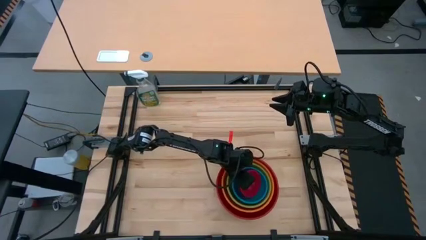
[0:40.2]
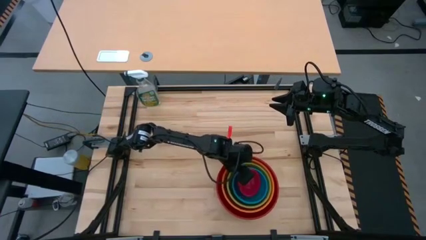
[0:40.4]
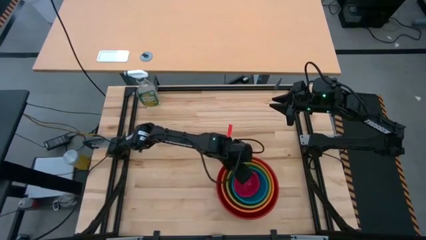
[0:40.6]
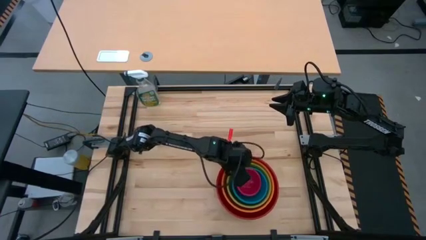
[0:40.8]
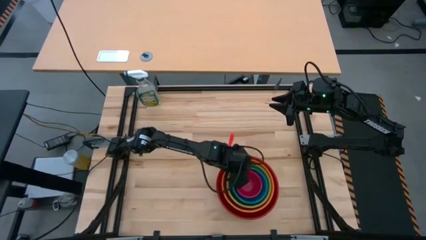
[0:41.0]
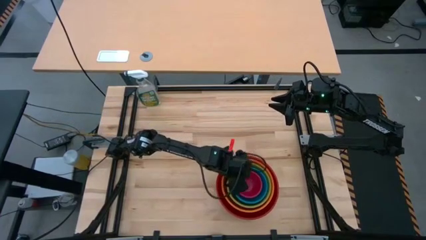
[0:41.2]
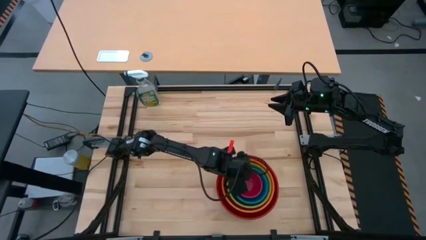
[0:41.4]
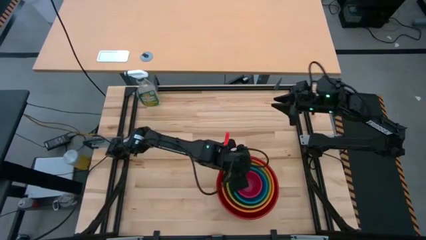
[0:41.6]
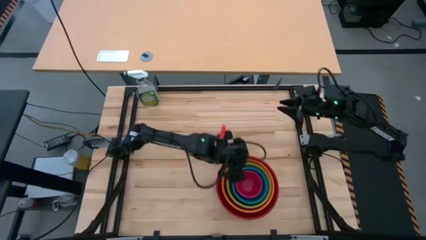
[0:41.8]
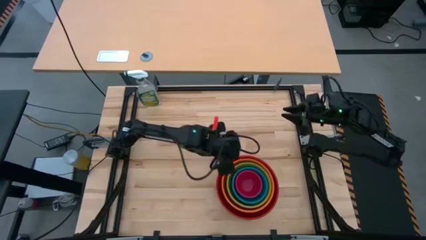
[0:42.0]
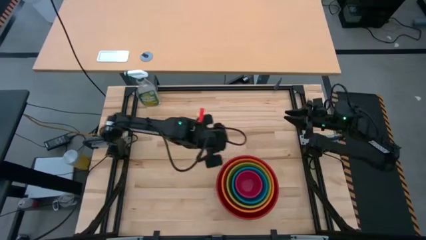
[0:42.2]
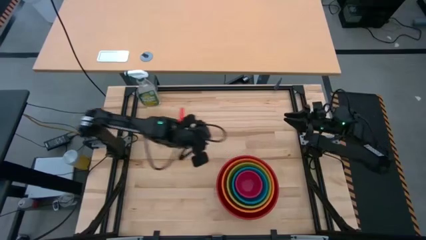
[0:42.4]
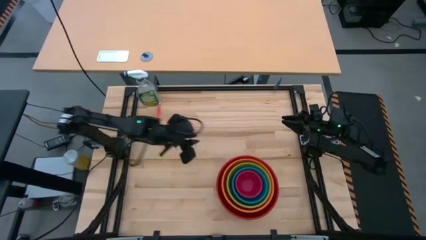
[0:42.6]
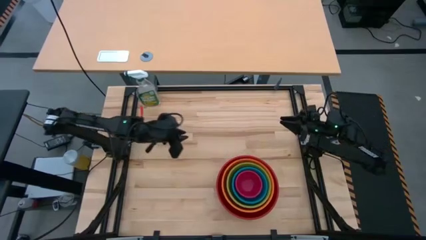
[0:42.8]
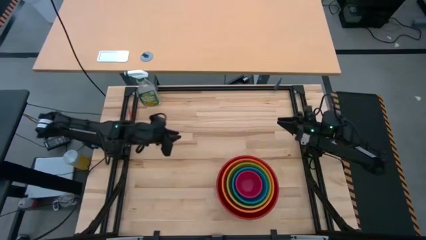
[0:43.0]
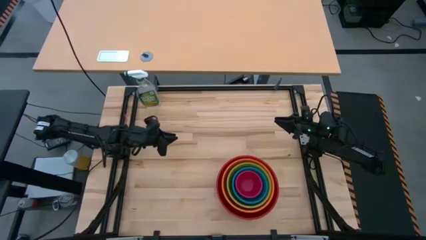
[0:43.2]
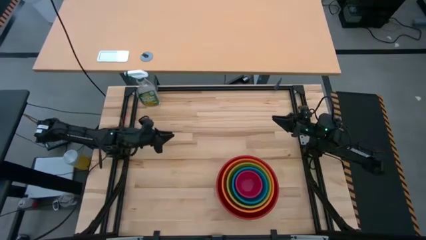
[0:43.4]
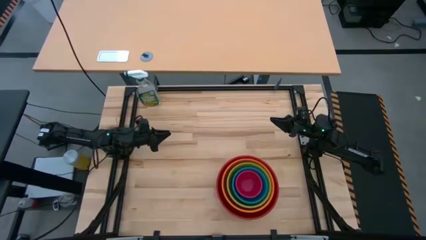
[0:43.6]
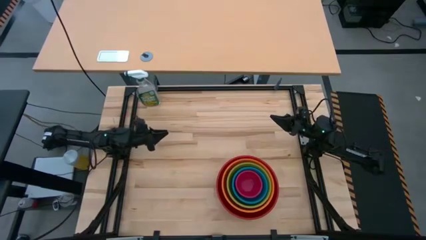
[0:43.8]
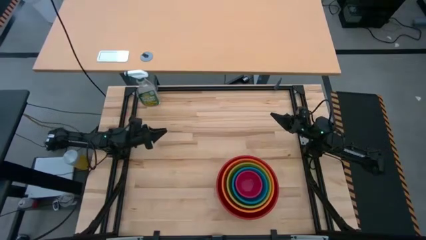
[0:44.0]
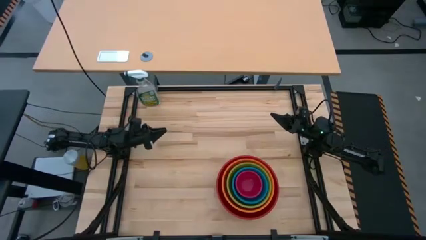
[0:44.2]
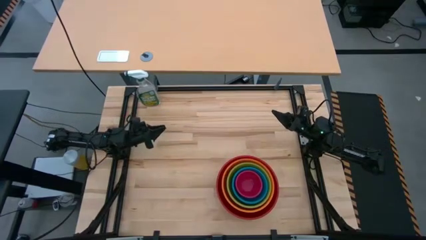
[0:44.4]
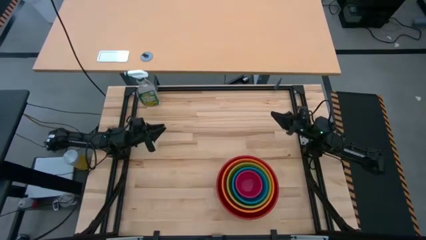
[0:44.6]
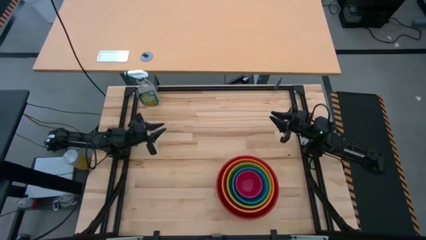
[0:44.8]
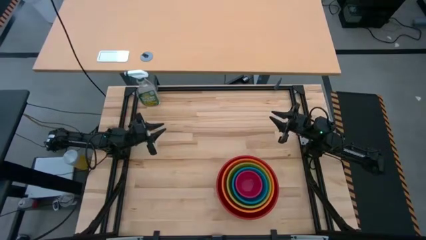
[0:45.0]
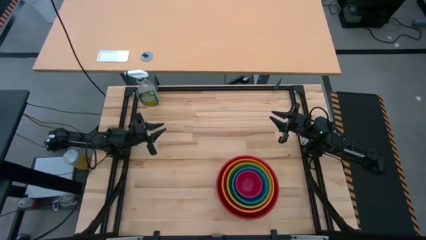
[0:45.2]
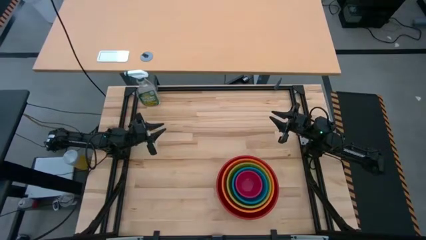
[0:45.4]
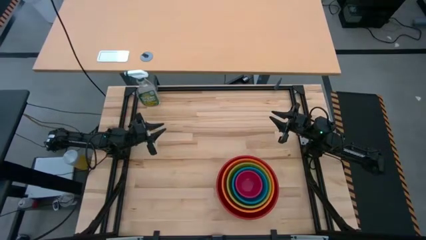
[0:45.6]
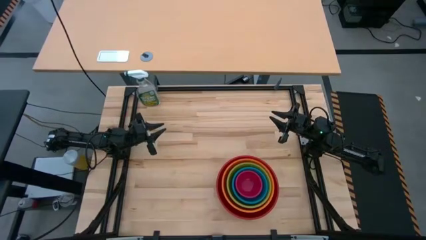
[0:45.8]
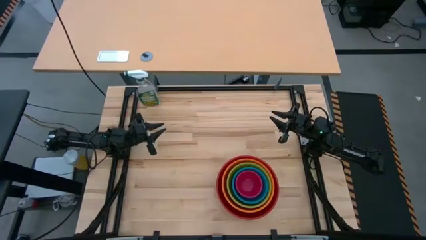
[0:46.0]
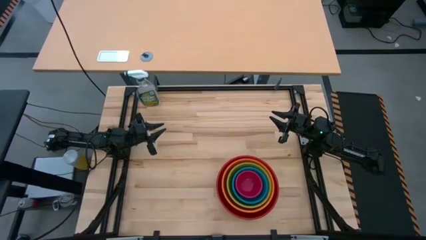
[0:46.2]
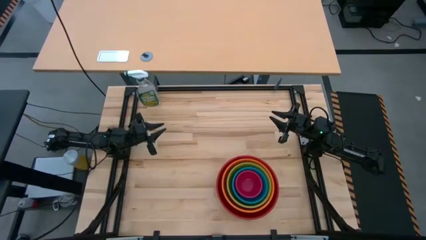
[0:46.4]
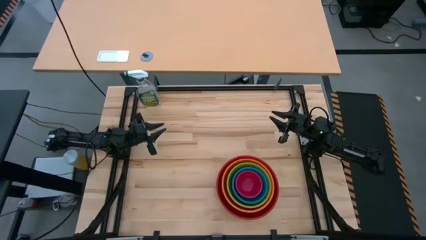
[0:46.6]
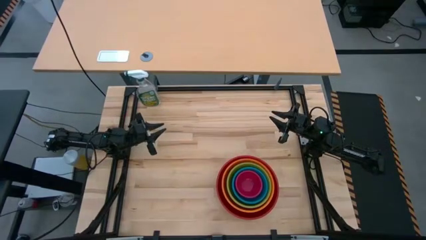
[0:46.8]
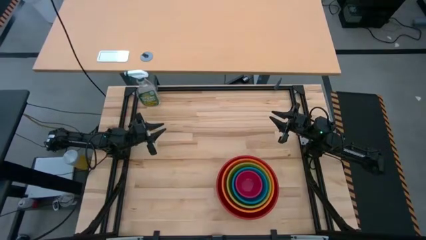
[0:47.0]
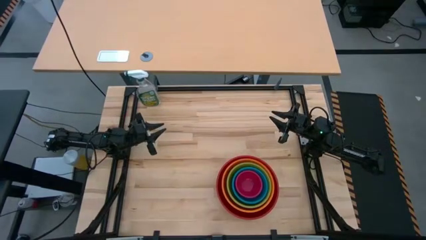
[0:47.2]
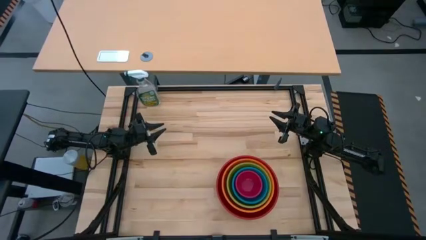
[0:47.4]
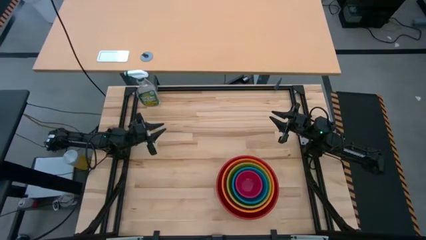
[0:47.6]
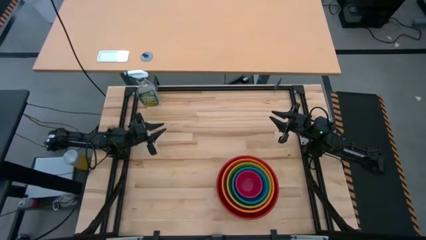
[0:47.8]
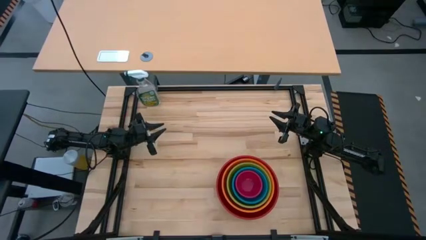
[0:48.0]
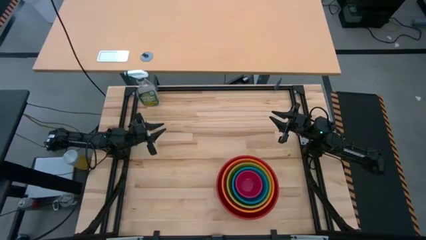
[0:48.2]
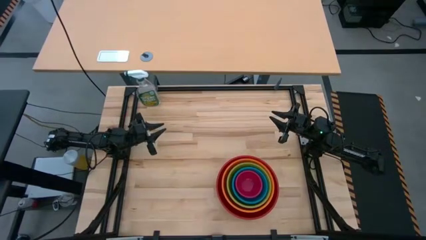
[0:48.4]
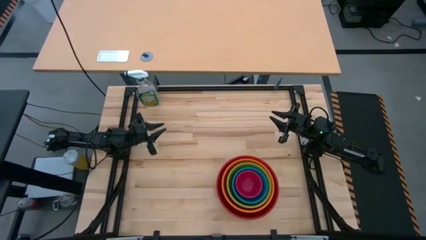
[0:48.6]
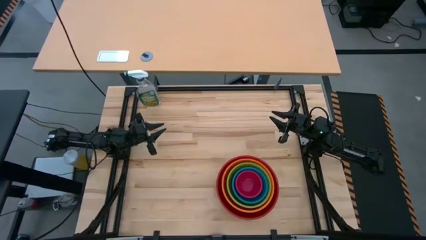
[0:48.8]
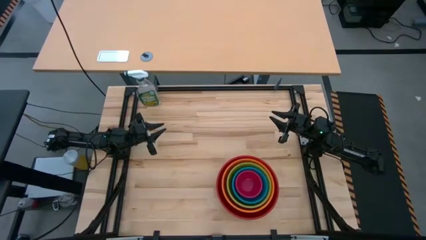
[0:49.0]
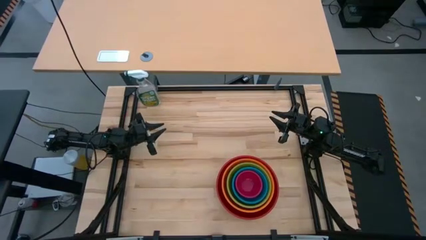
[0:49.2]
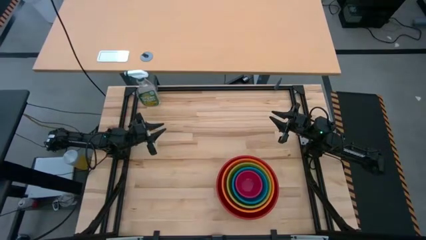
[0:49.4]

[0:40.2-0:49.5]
Task: Nest bowls inside each other by size order
Return to Home Position

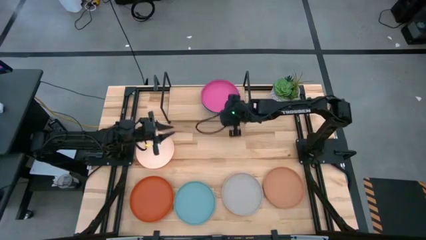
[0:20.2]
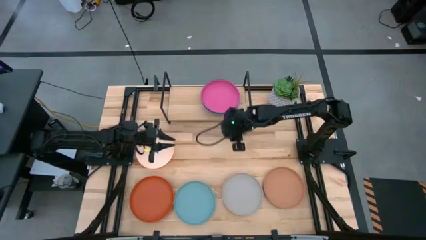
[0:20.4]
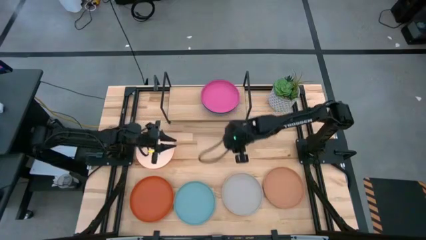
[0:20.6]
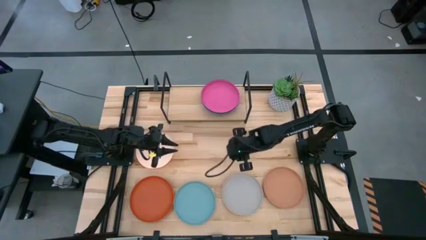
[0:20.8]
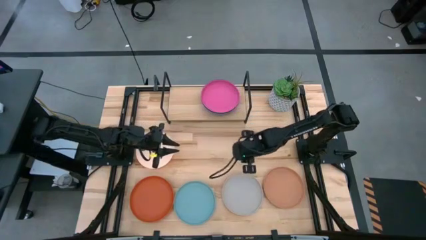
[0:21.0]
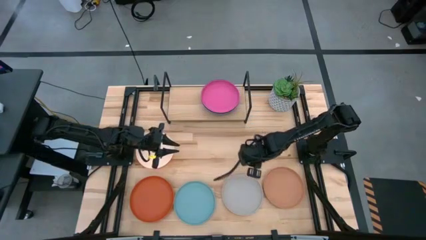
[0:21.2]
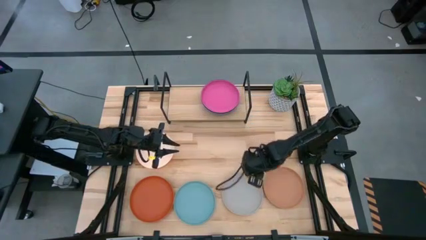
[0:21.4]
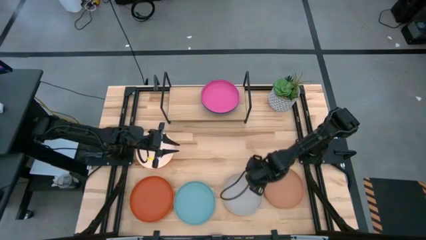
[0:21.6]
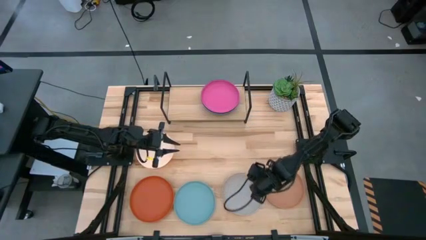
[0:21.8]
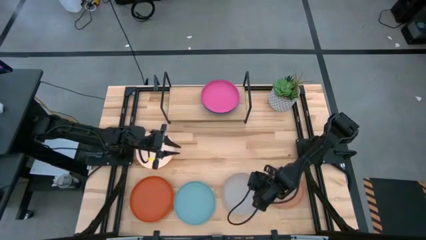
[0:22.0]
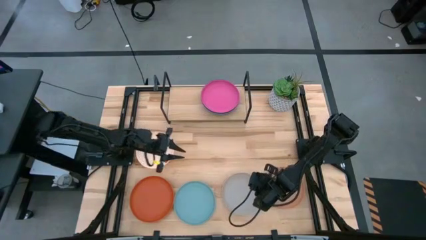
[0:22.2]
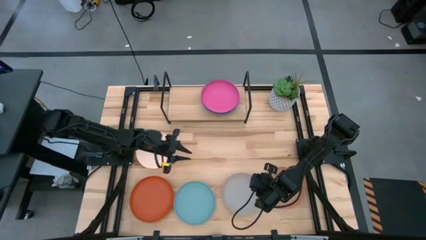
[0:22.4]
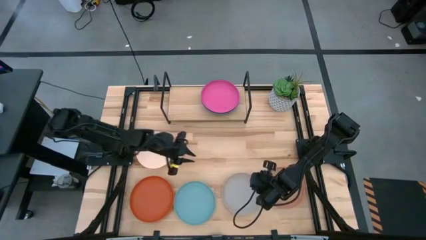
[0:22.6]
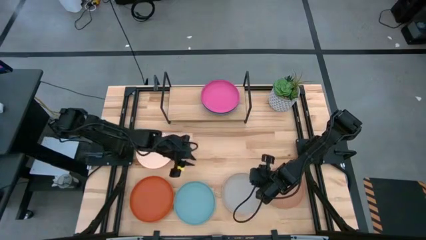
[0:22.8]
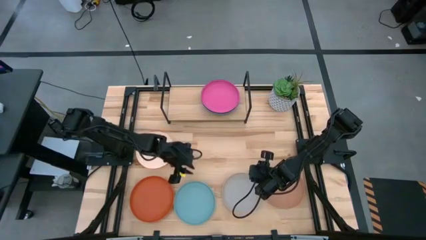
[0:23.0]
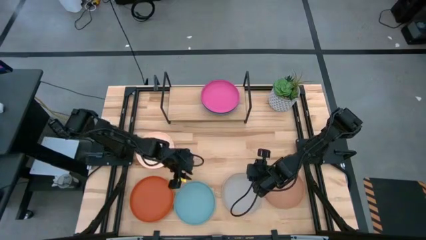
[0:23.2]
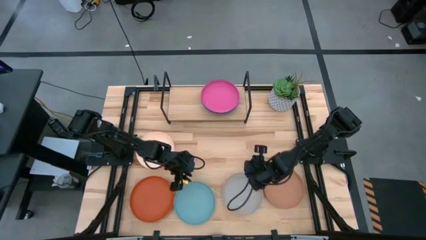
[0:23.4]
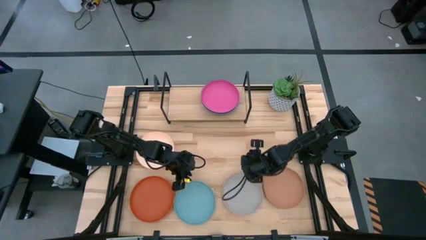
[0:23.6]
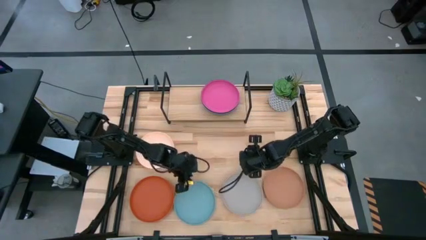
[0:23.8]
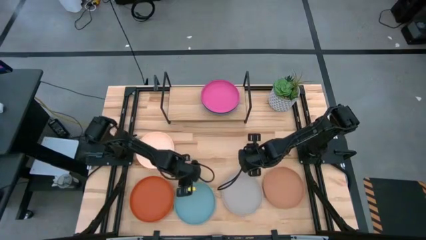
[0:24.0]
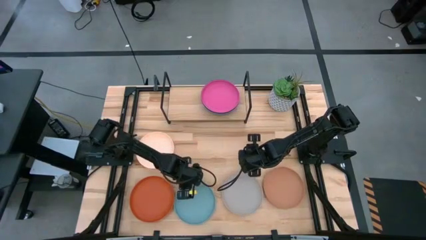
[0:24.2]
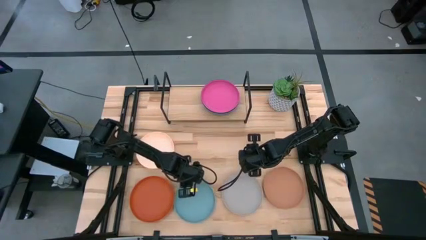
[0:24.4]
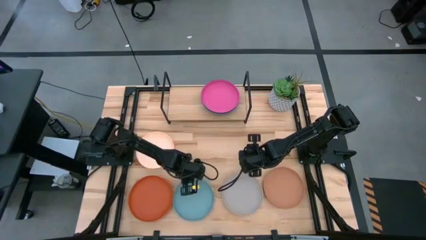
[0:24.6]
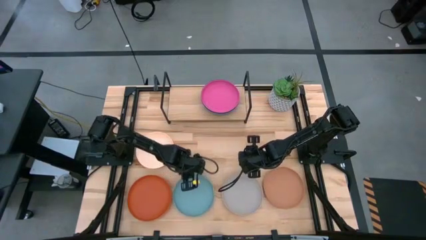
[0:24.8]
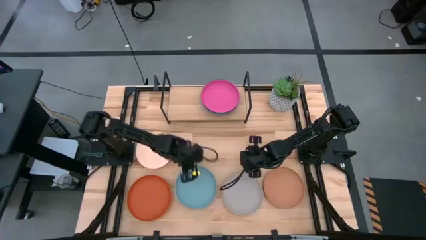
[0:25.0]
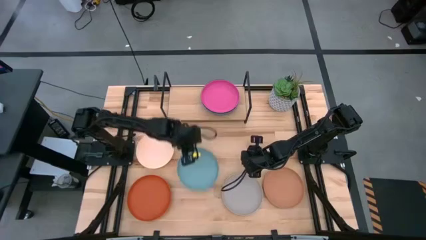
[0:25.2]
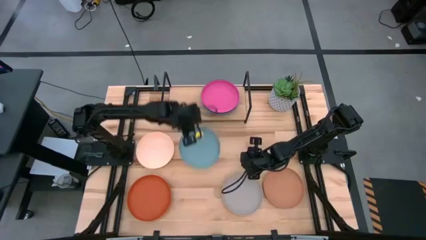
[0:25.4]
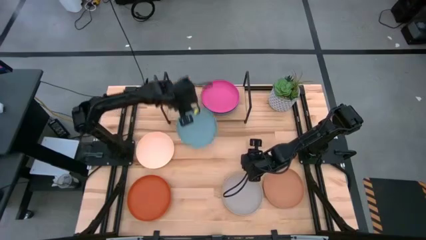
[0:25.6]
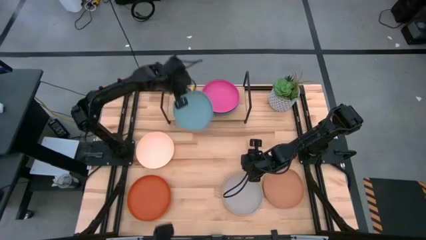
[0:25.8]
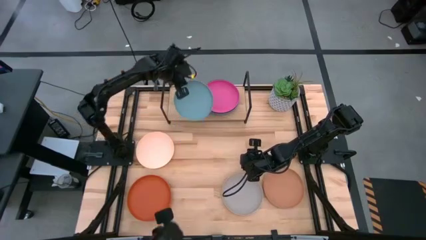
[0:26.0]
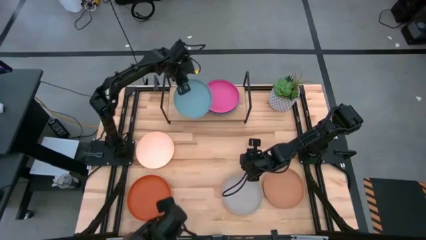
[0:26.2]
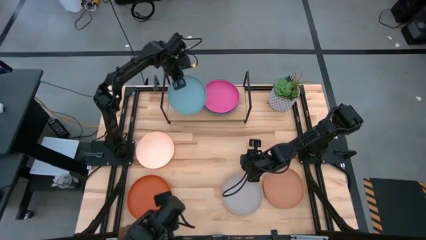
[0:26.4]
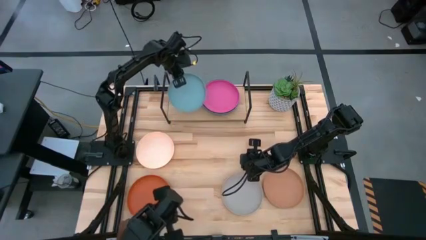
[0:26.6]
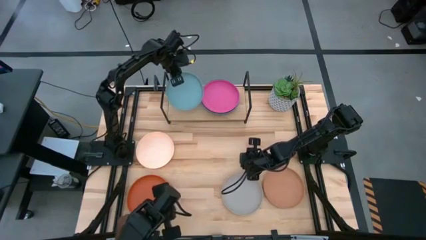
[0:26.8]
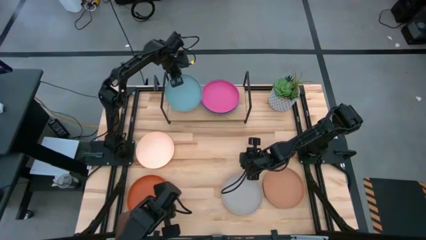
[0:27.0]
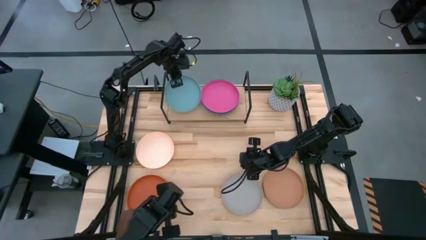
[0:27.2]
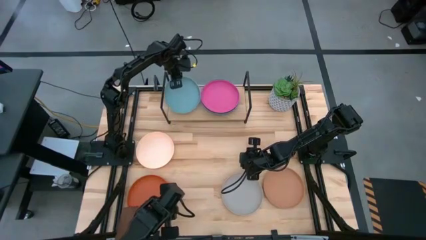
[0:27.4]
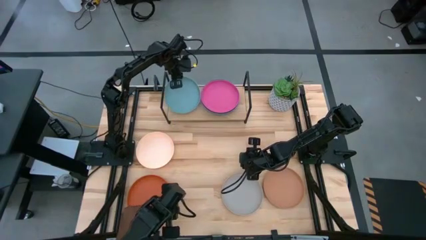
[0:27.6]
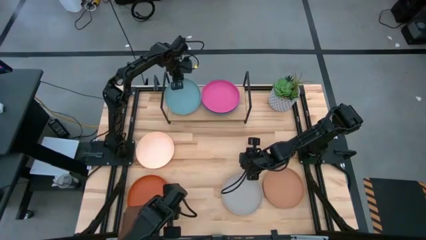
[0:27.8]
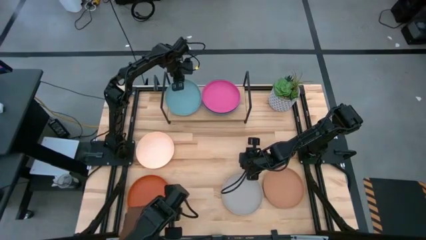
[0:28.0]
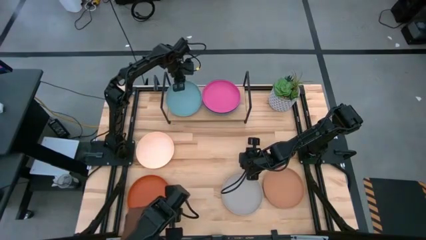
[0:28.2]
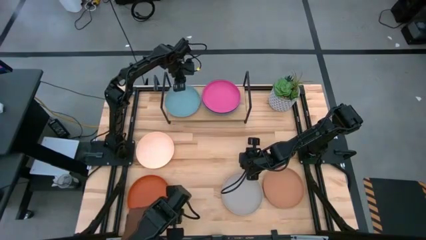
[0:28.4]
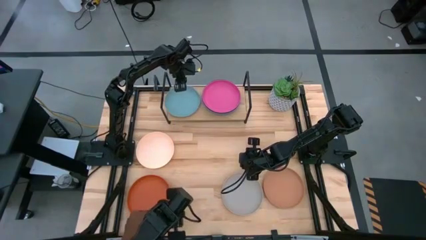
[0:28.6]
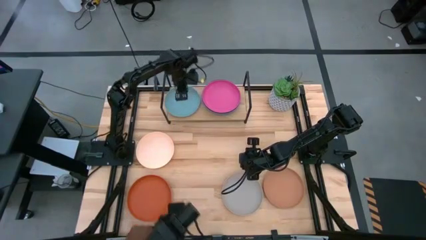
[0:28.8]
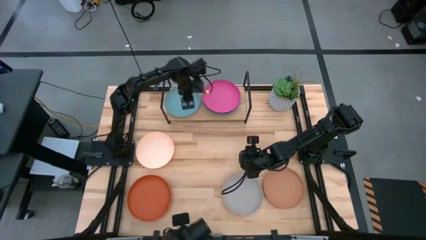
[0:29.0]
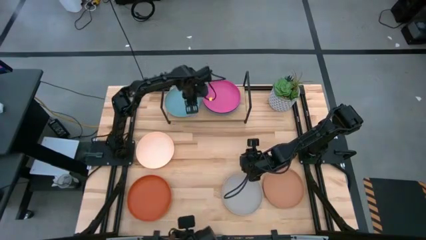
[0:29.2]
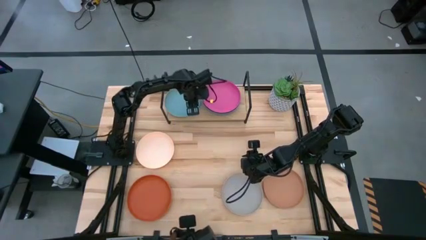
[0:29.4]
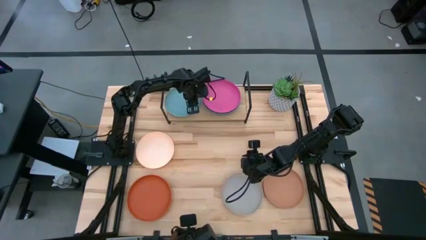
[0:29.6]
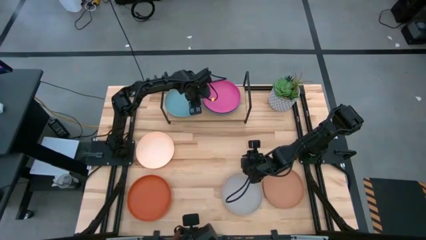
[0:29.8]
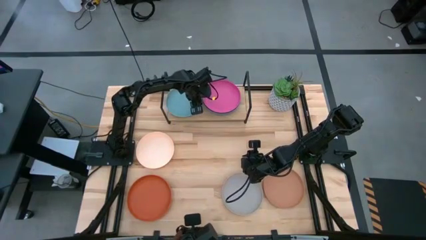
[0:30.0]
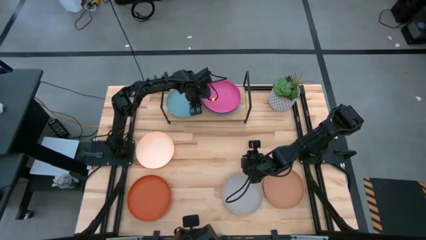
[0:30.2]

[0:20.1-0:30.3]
Task: Place and stack plates onto a shelf
Put the light blue plate on the shelf
